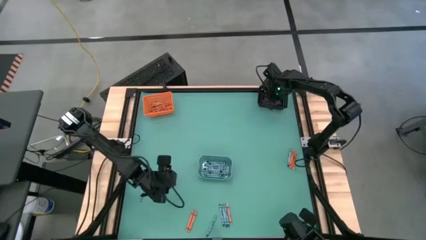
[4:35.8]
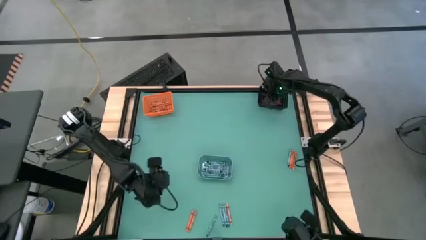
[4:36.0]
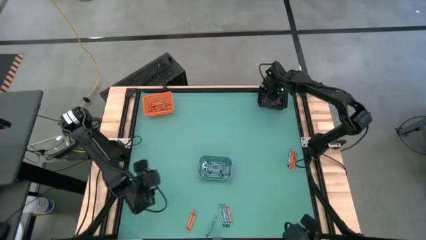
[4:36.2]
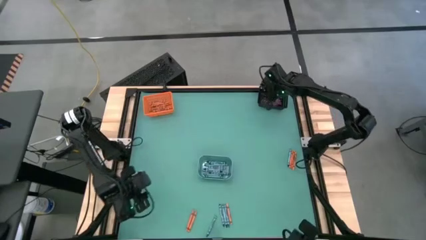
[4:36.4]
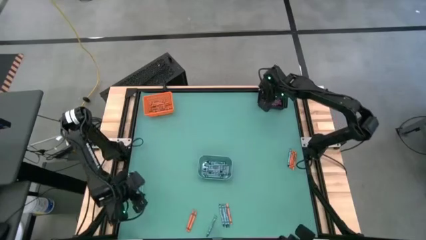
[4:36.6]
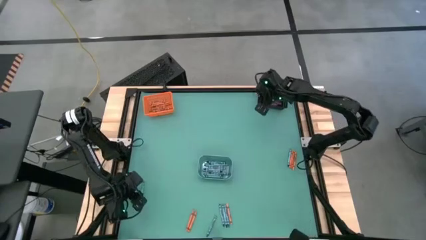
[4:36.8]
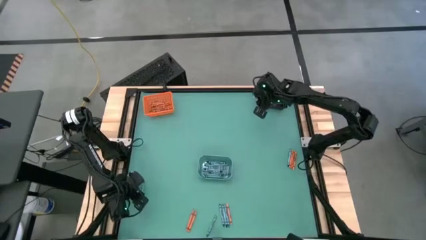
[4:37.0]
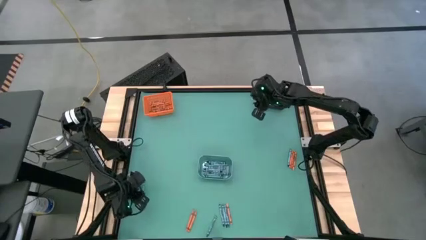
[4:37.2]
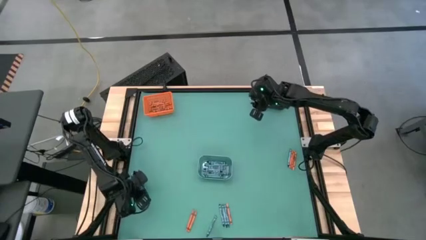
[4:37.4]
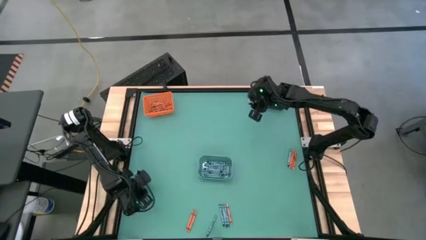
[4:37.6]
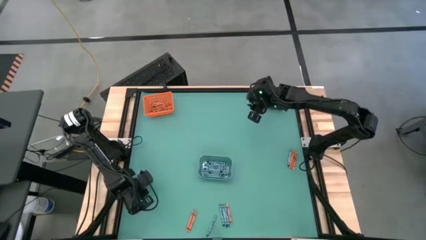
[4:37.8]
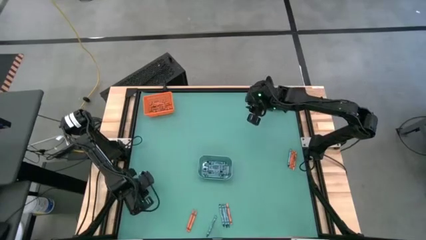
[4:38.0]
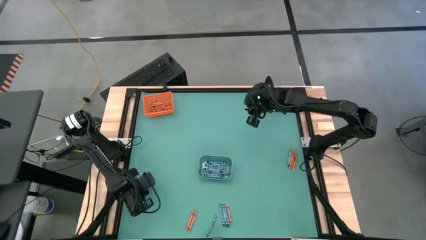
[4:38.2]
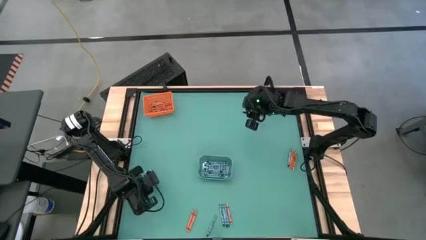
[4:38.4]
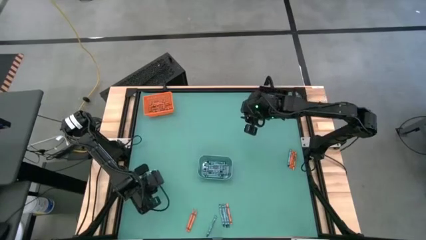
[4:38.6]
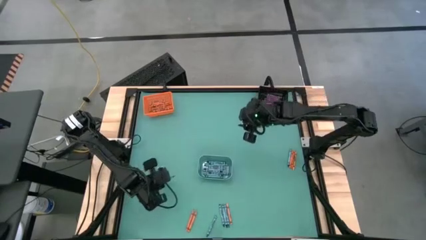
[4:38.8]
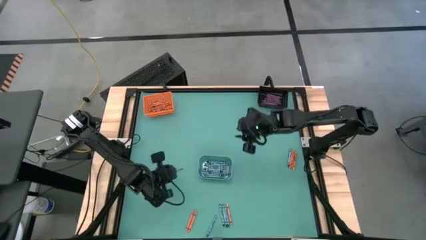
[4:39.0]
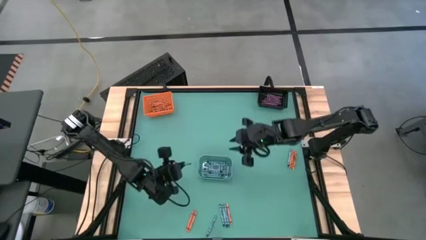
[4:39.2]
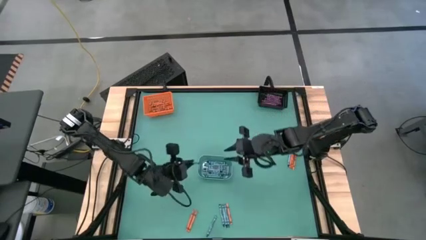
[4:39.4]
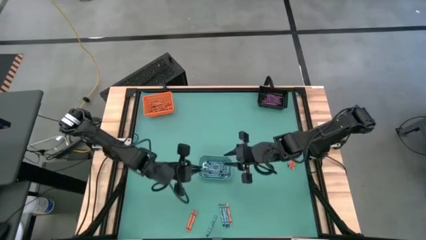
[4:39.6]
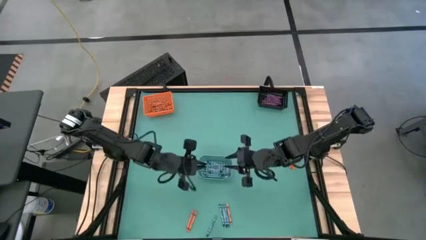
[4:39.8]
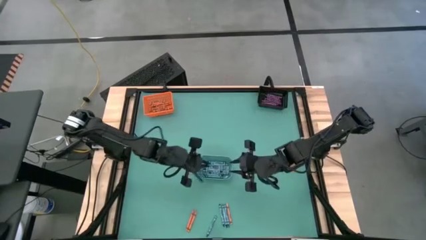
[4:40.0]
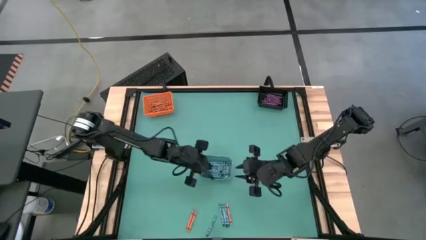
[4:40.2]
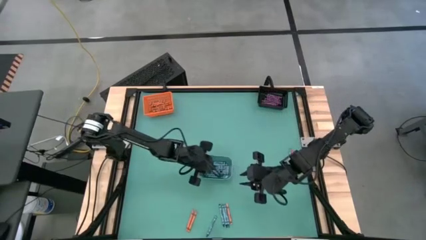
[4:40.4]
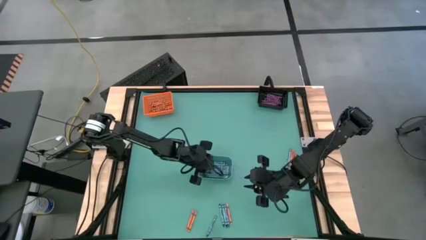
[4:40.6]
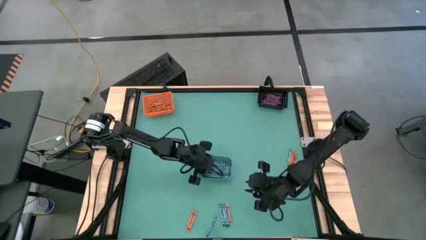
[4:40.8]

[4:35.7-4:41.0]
Task: Sort crayons
Put the light blue crayon into the blue bin

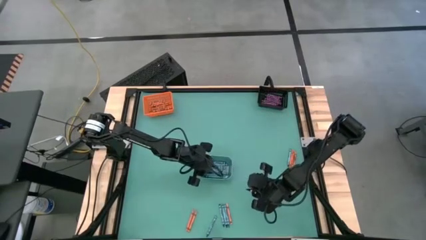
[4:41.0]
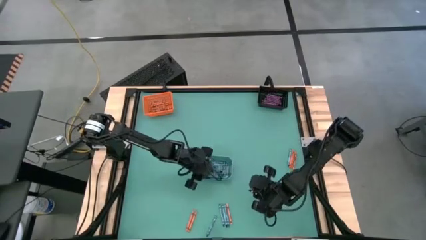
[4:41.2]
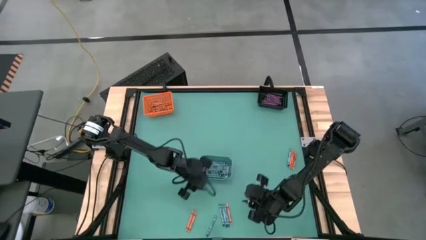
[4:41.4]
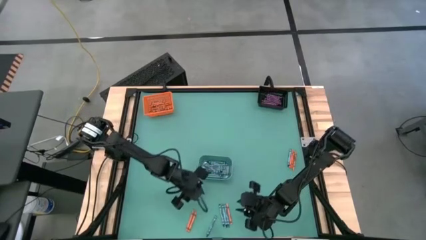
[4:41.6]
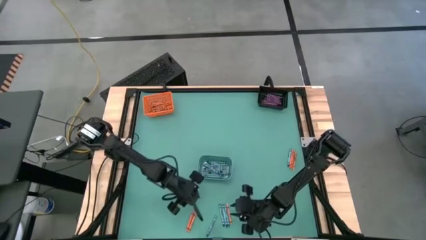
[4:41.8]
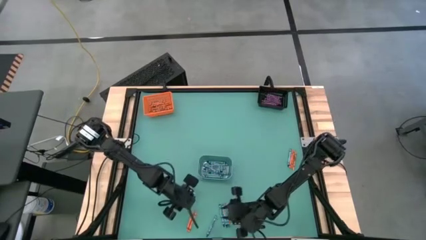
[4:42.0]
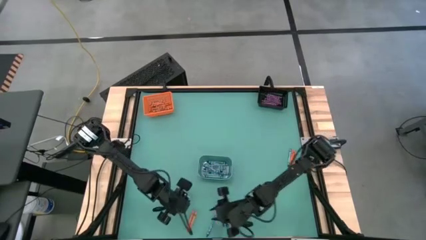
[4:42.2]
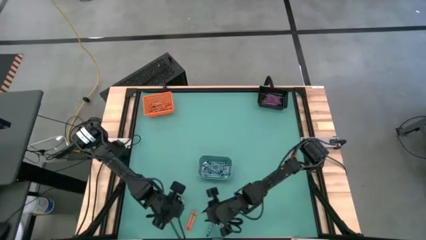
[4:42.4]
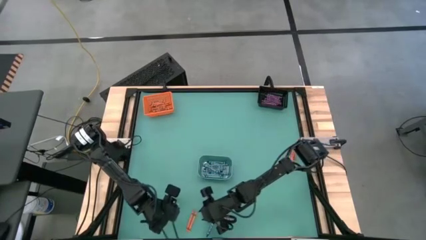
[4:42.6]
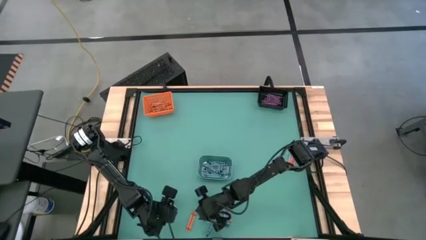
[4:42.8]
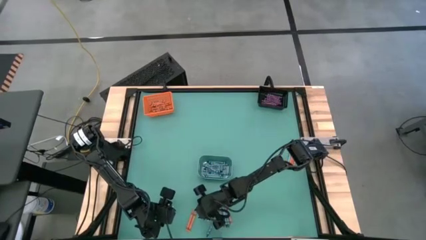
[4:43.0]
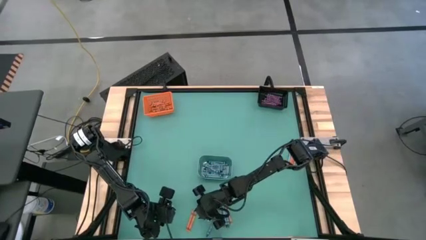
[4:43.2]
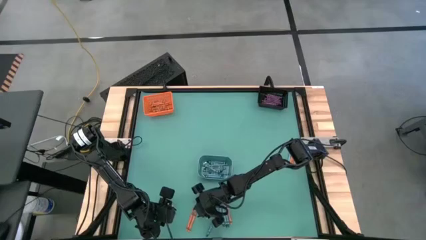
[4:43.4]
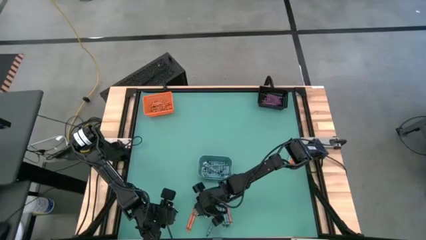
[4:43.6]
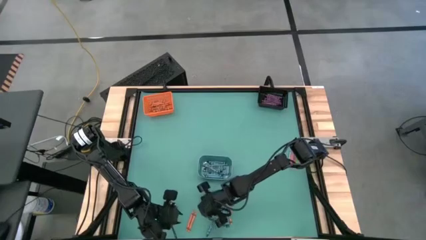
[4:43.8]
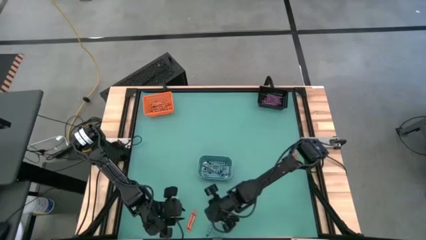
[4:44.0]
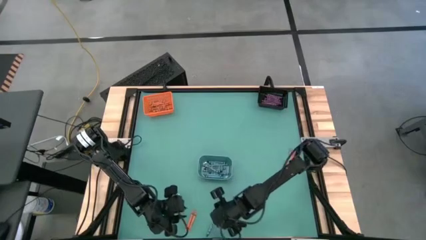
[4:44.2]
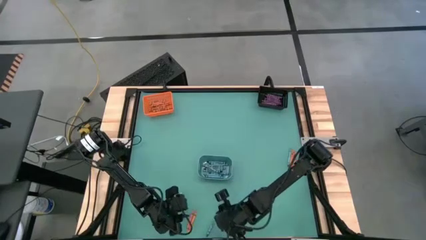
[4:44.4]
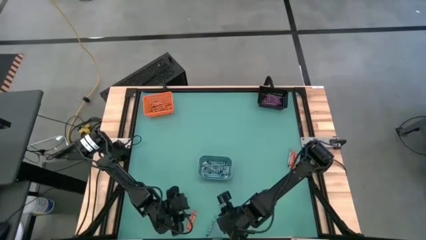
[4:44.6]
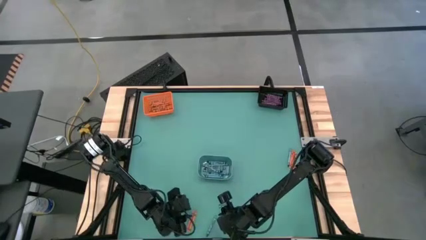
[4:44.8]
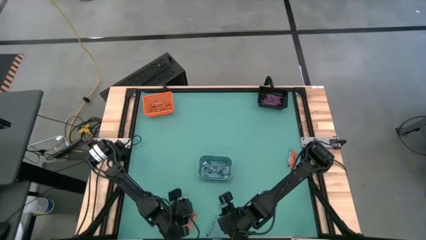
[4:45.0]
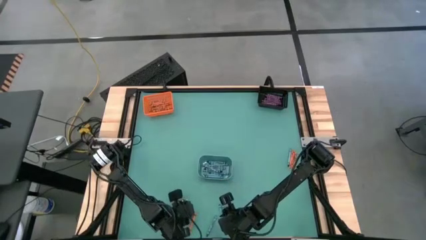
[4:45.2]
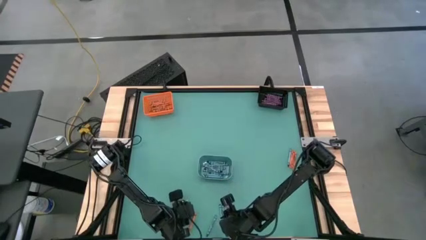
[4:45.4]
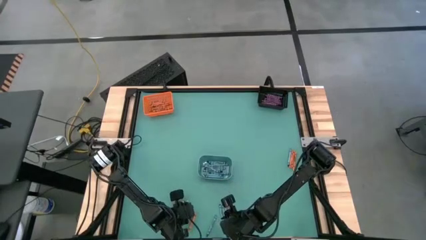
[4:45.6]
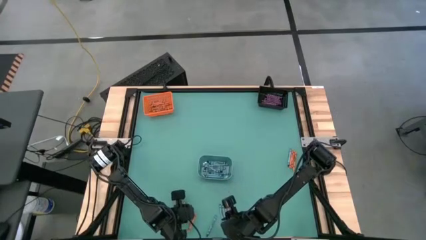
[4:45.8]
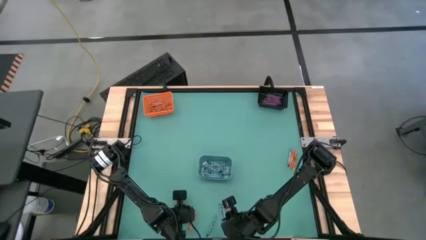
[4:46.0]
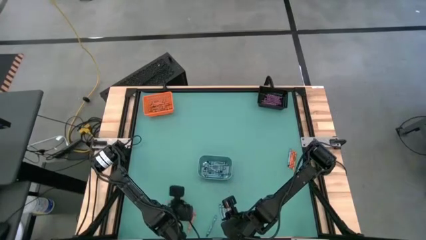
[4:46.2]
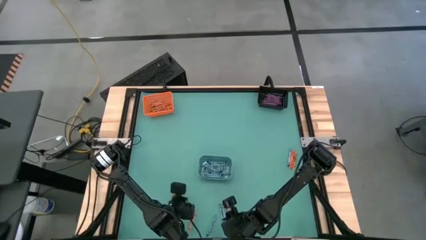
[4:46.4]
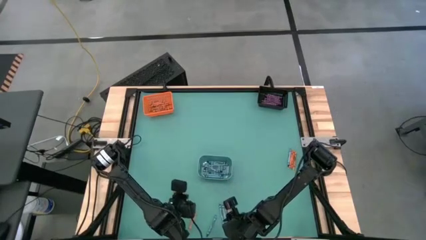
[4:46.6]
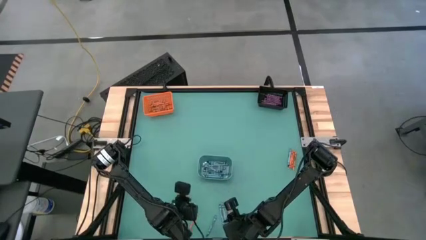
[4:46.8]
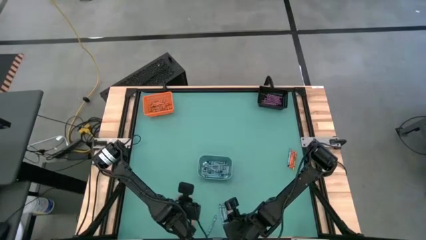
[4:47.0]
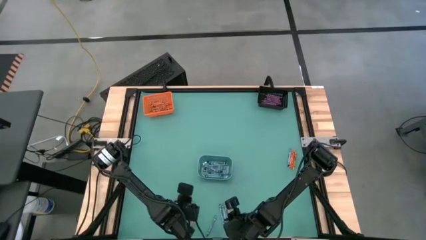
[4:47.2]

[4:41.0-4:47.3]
Put the orange crayon into the orange bin

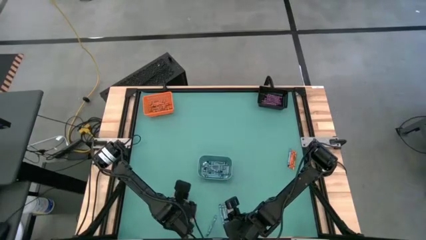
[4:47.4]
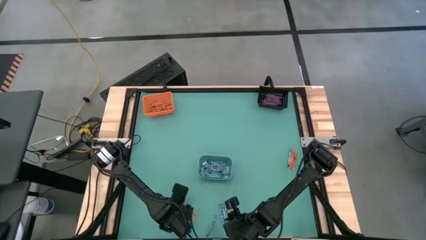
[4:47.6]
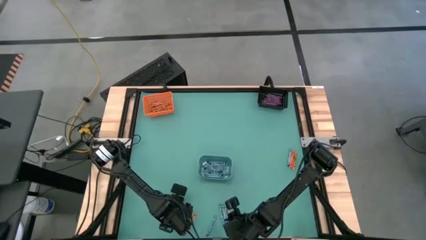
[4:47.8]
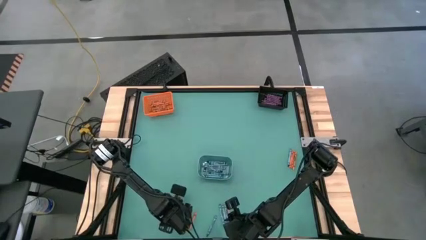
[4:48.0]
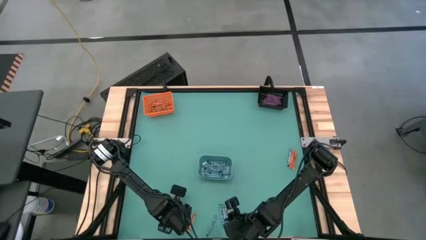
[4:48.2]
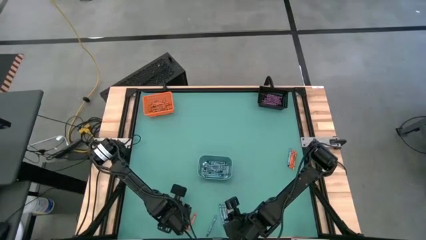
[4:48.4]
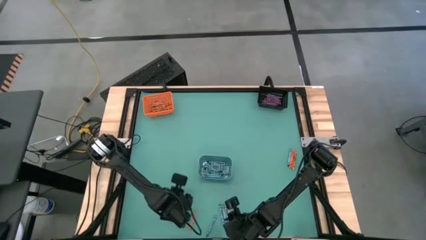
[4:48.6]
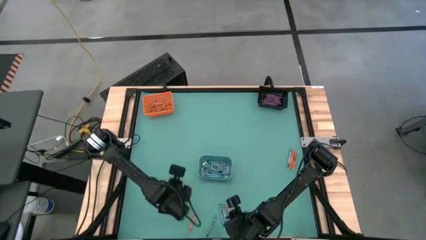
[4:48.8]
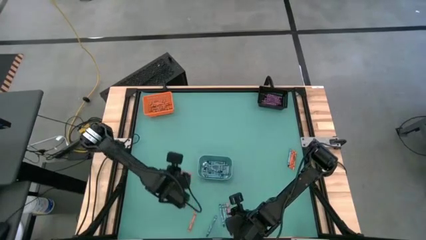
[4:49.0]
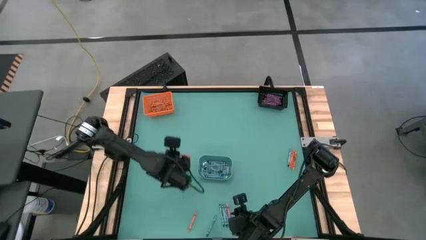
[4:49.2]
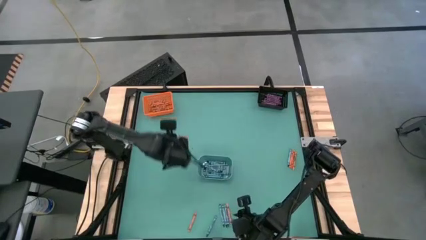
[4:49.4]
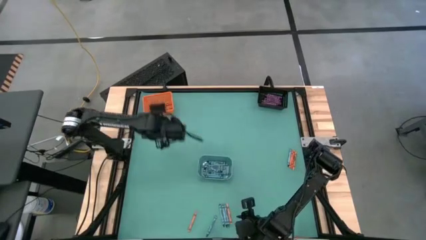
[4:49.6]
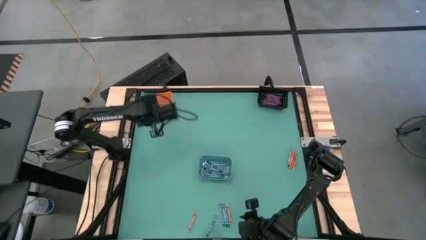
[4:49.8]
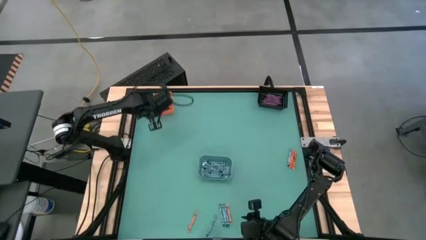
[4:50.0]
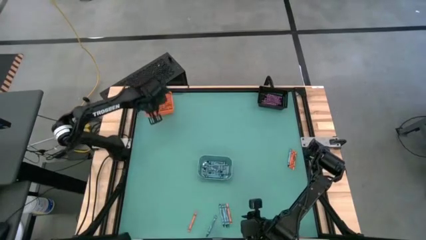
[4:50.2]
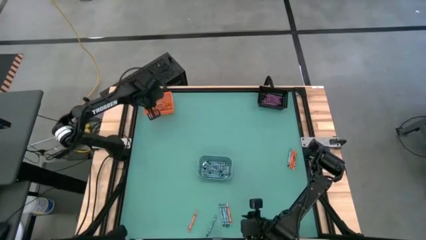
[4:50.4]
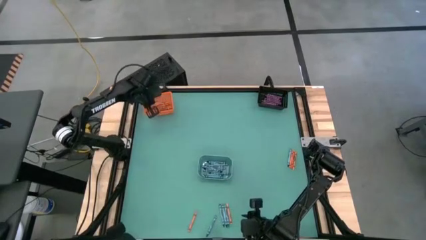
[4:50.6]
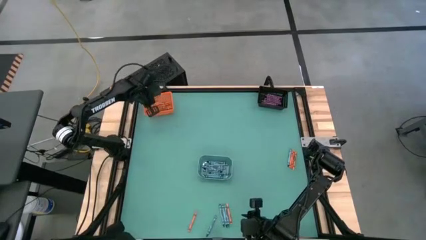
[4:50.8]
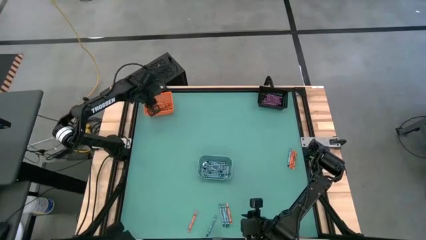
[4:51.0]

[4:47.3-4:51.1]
Put the orange crayon into the orange bin

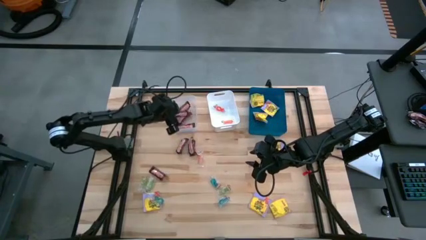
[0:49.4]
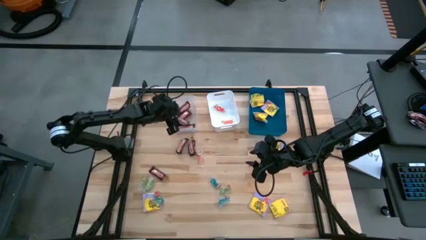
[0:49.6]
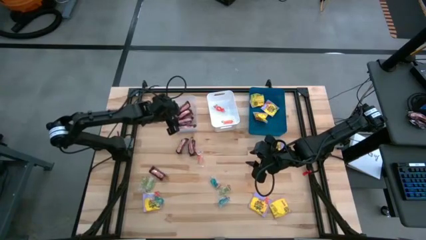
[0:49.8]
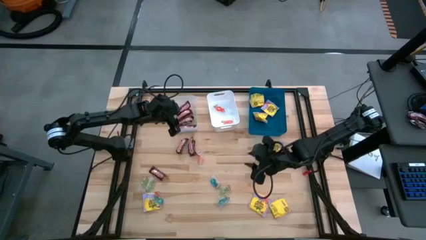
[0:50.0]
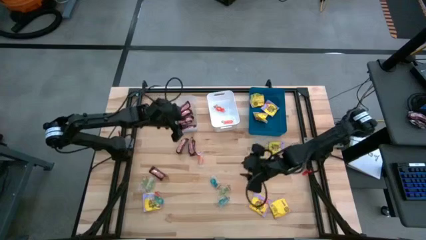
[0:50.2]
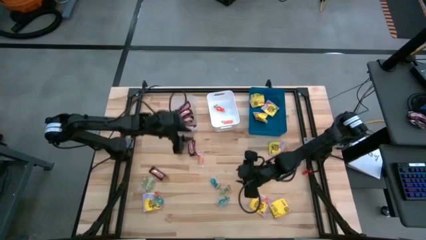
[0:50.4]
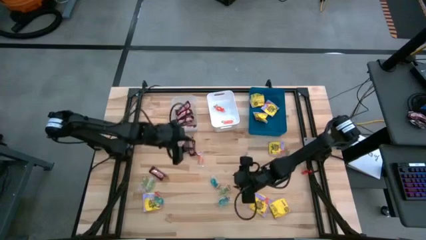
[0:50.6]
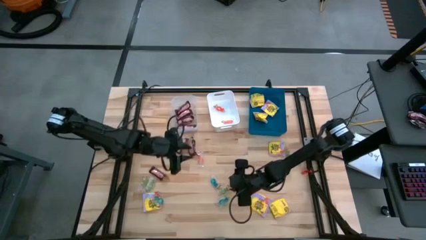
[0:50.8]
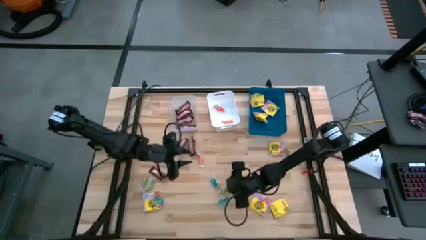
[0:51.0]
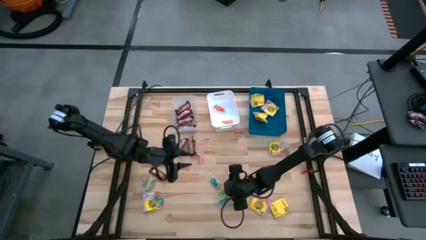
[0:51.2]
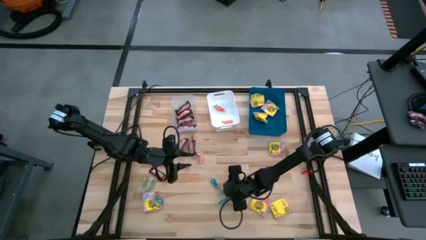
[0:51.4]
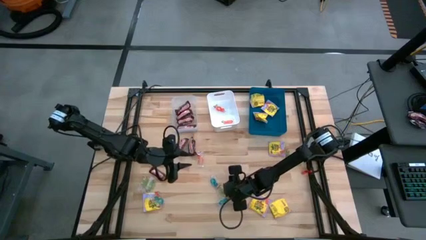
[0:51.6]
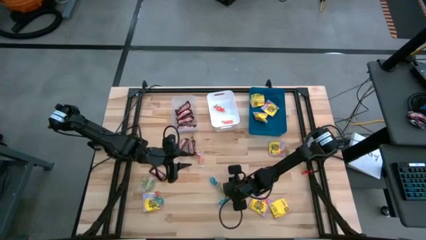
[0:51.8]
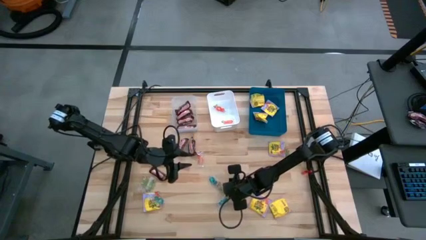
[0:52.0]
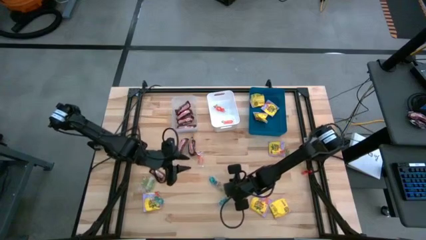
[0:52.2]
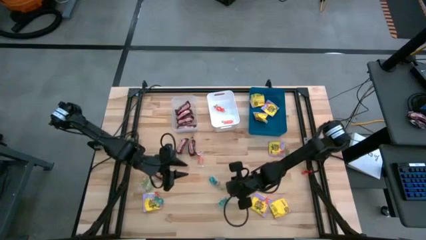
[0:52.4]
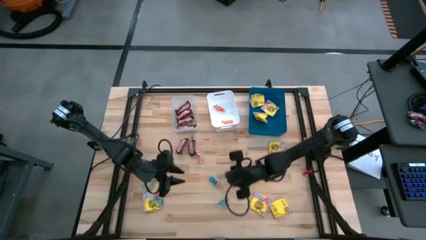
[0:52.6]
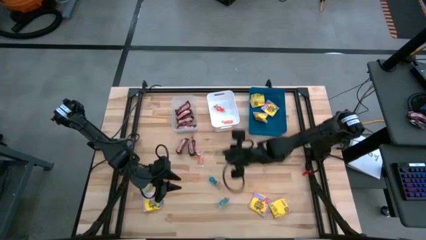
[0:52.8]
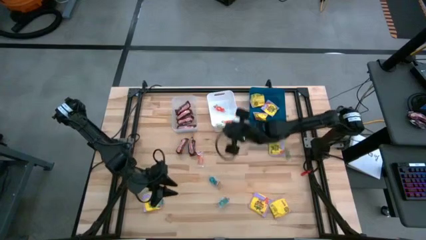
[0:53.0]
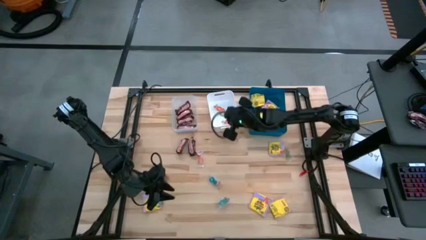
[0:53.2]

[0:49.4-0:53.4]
Task: Sort candy
Put the bottom center green jelly candy into the white bin
